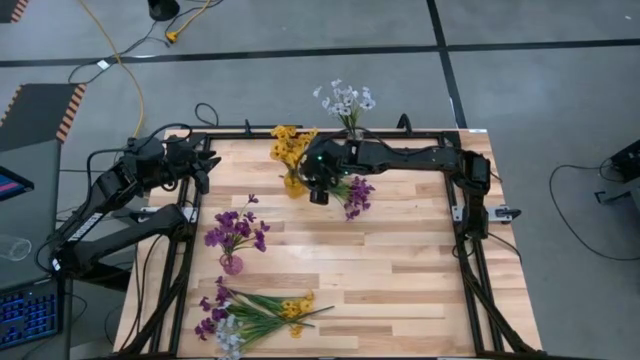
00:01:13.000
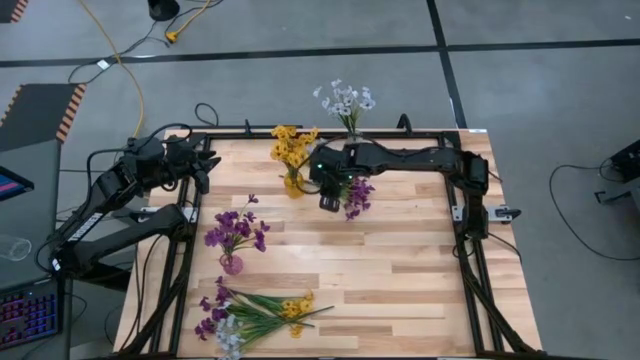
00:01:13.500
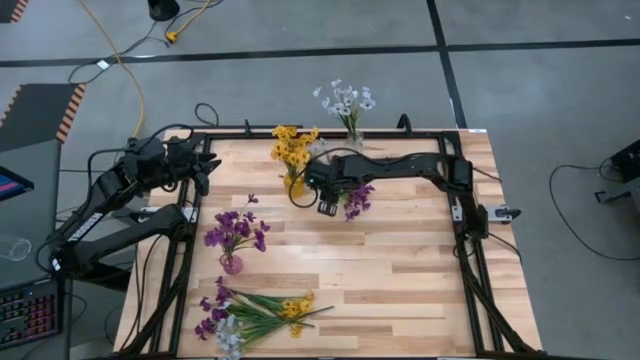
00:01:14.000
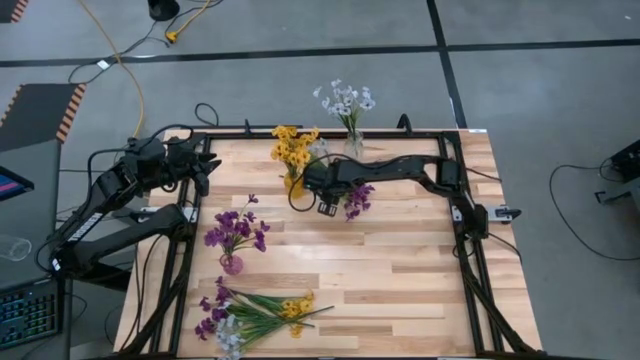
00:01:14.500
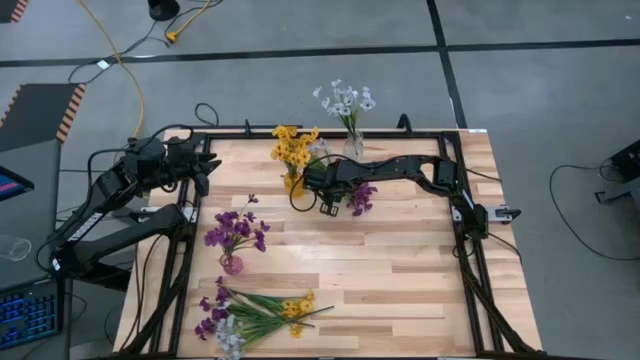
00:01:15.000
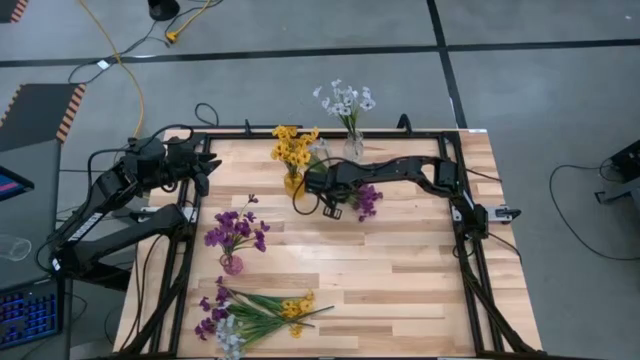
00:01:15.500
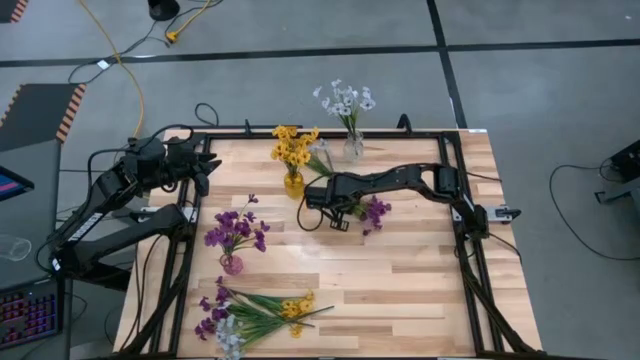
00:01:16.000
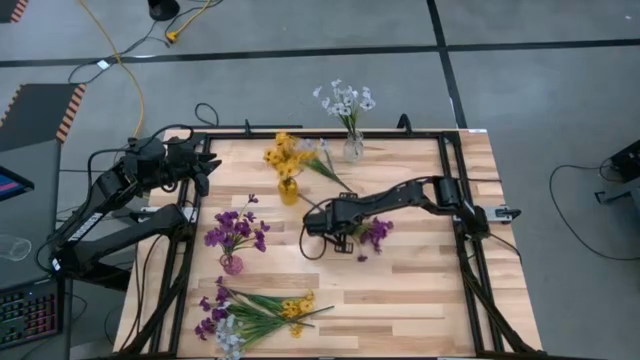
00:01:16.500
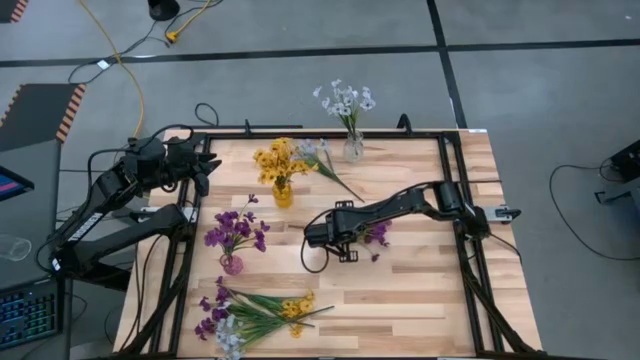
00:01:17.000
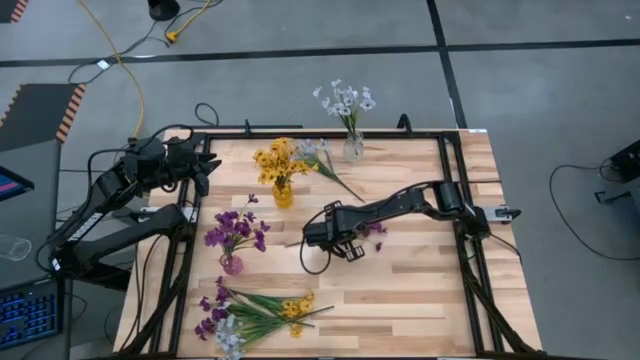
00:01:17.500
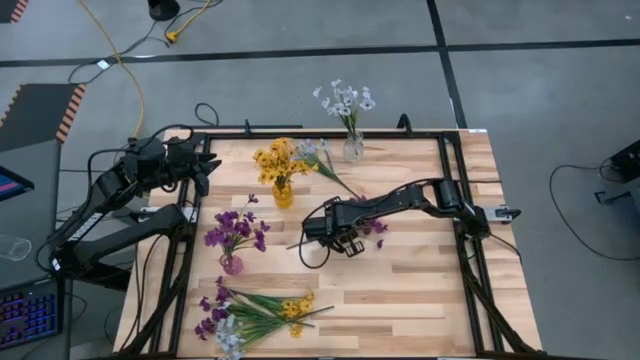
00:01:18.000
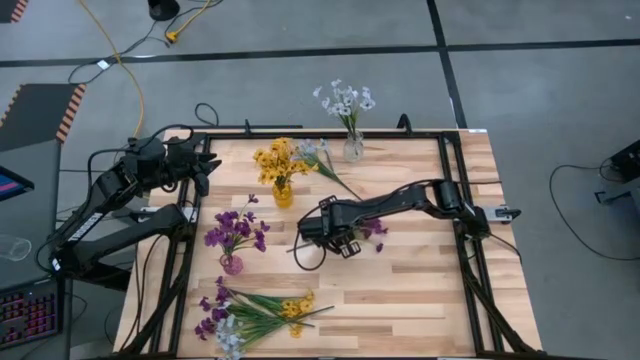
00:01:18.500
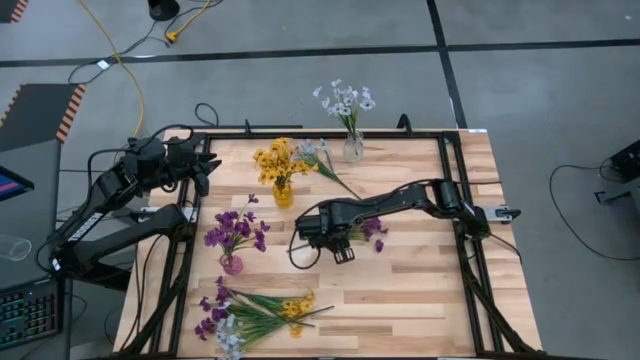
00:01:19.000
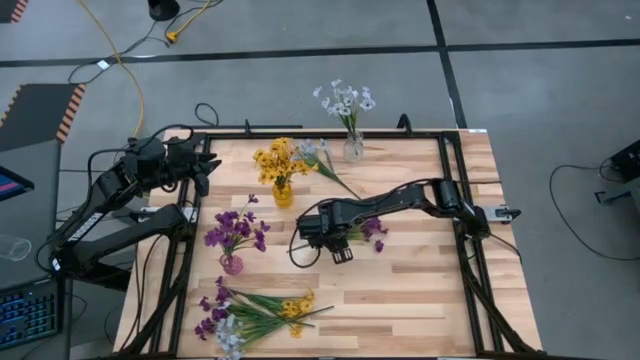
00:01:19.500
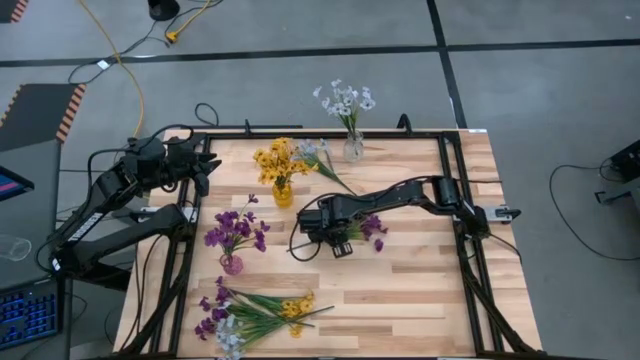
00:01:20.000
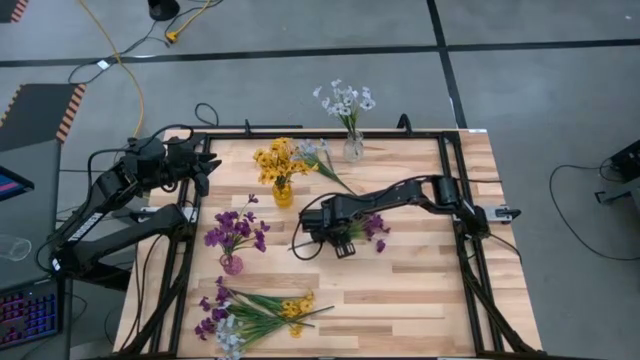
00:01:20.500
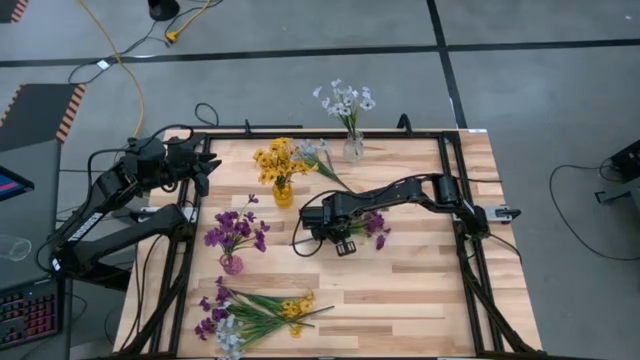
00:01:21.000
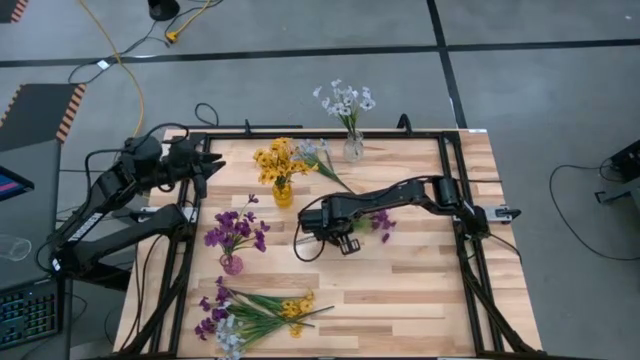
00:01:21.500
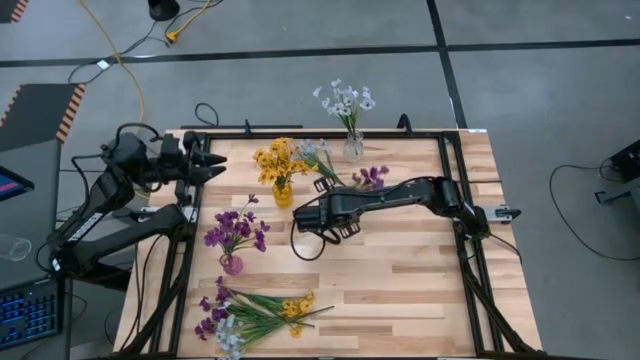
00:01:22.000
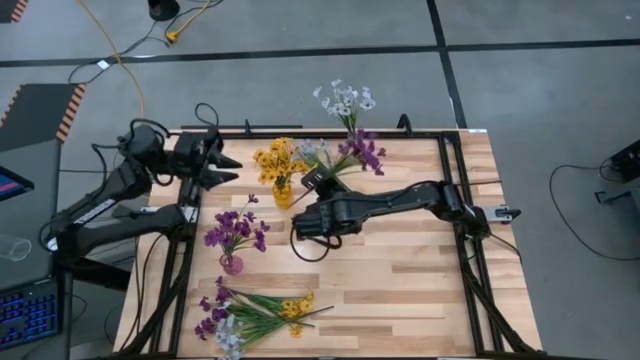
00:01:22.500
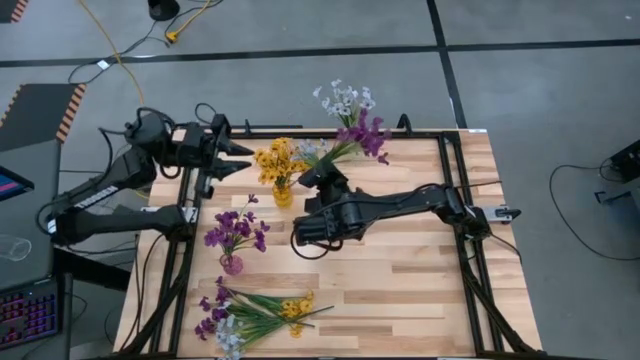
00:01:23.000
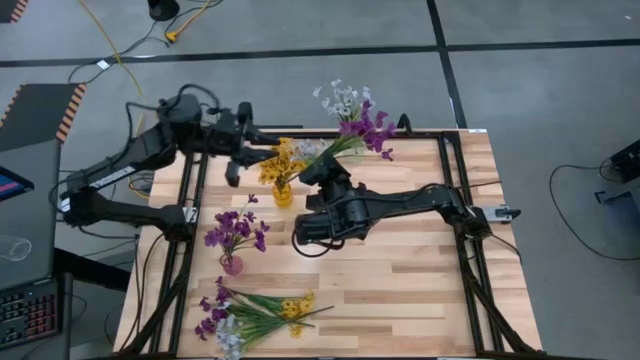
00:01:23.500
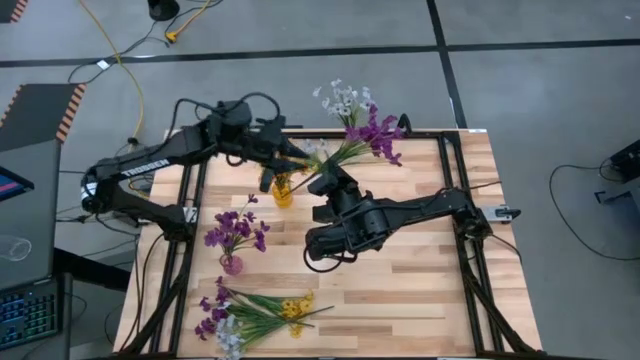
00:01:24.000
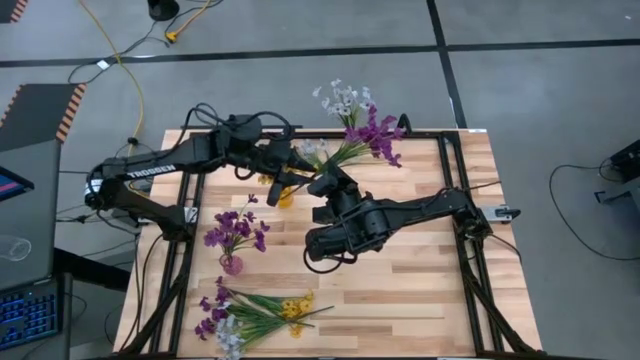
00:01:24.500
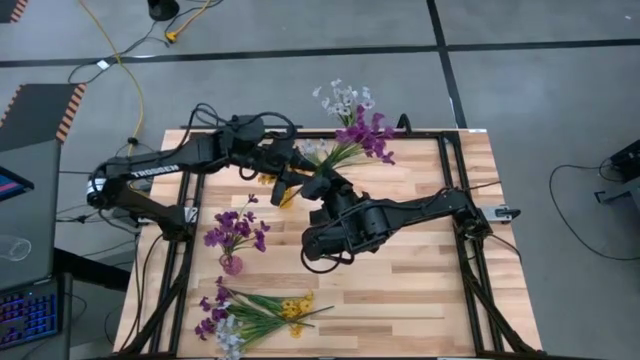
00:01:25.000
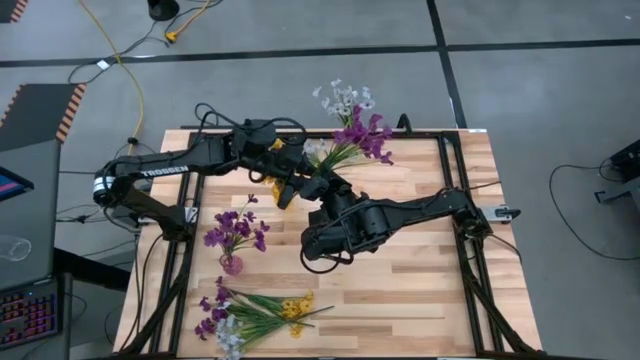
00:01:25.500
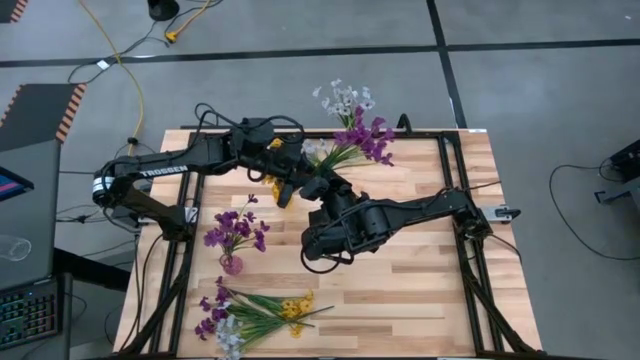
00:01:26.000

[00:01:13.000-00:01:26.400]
Task: Sort flowers into vase by color
Put the top violet flowers into the violet vase

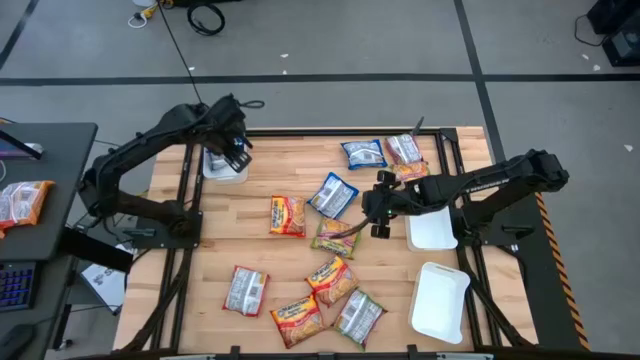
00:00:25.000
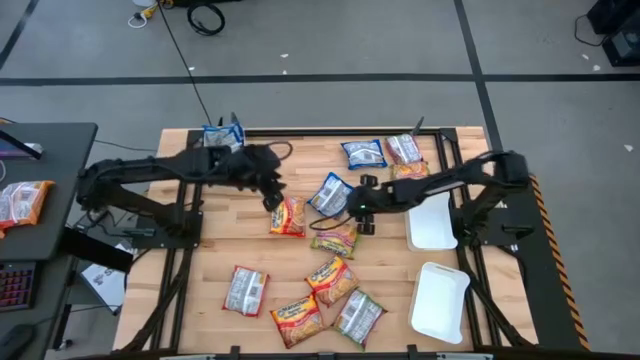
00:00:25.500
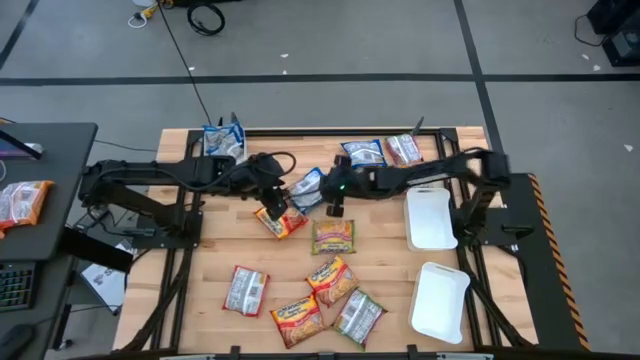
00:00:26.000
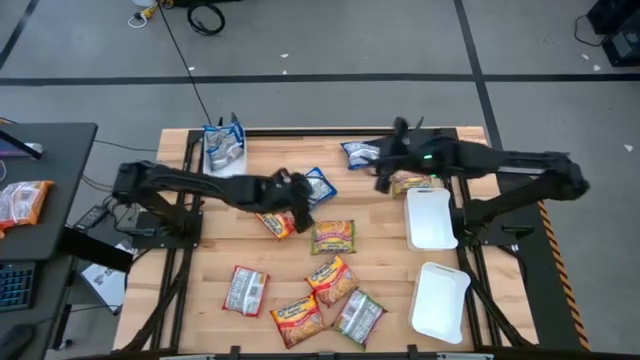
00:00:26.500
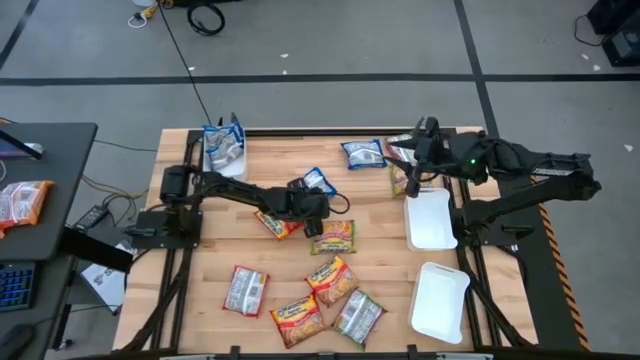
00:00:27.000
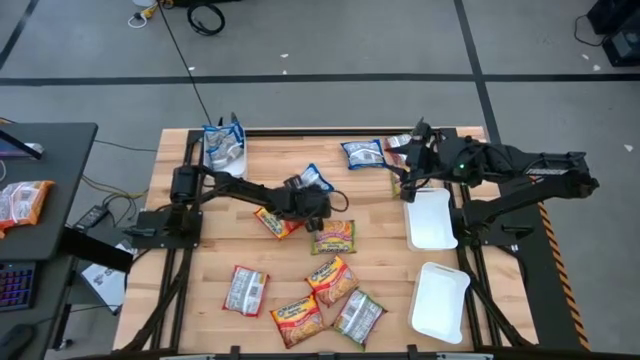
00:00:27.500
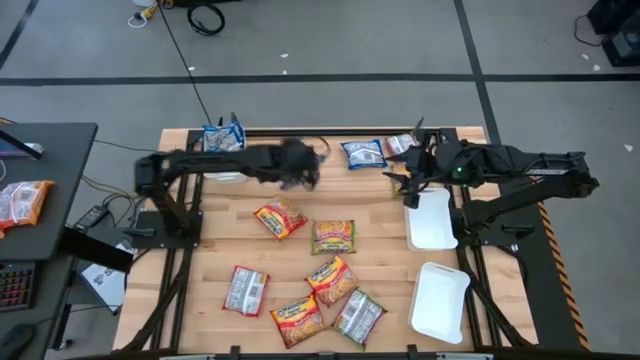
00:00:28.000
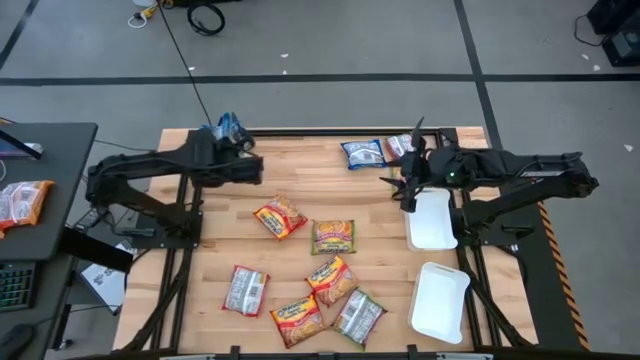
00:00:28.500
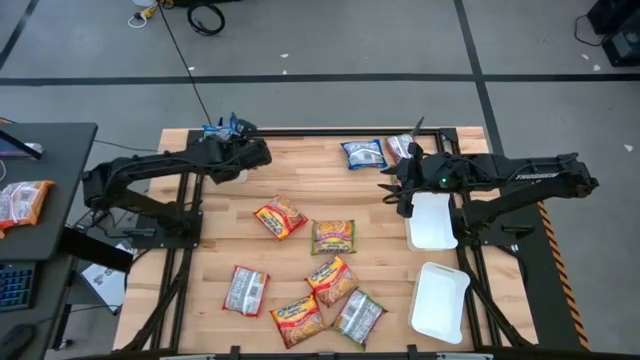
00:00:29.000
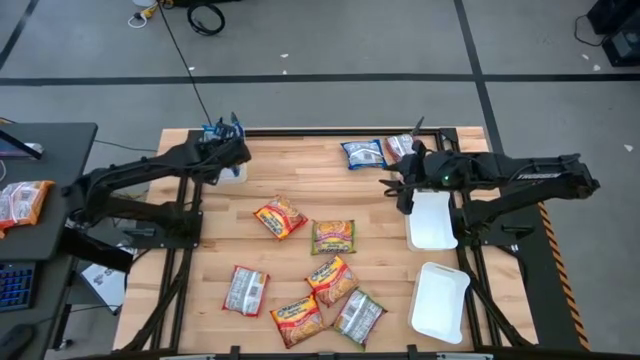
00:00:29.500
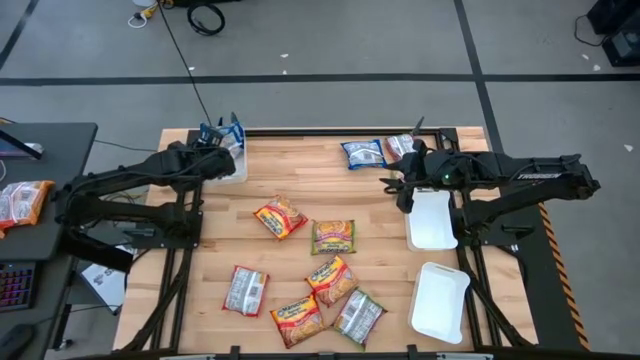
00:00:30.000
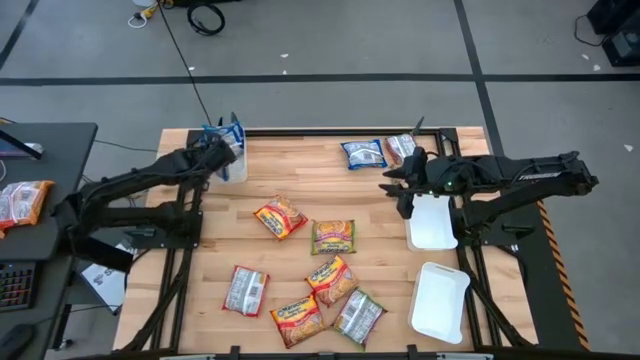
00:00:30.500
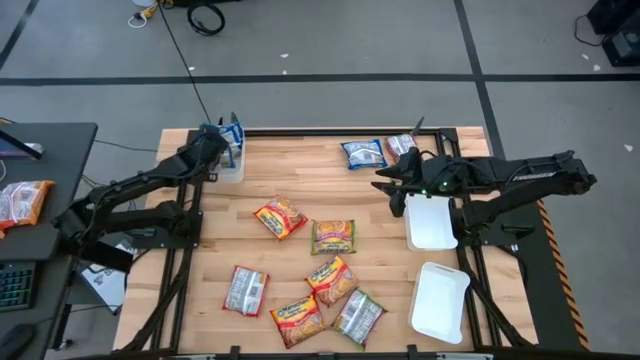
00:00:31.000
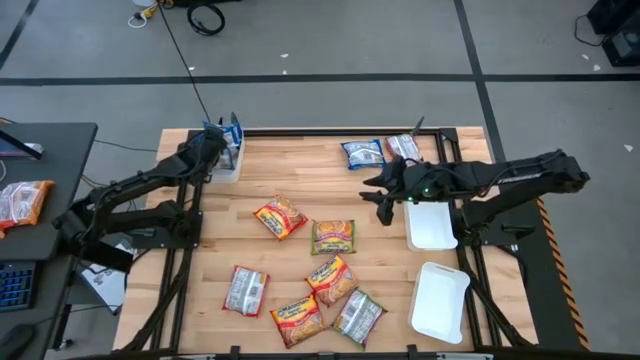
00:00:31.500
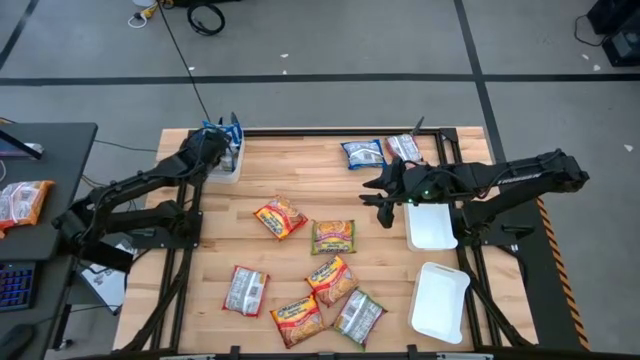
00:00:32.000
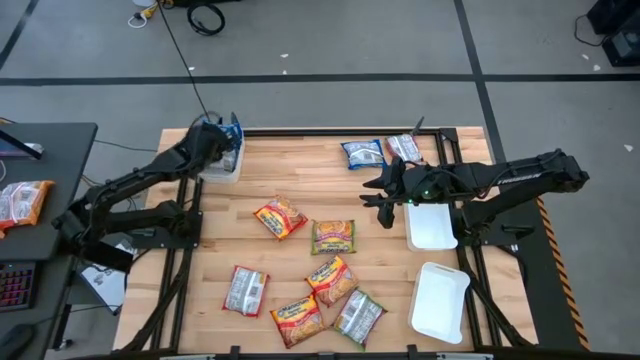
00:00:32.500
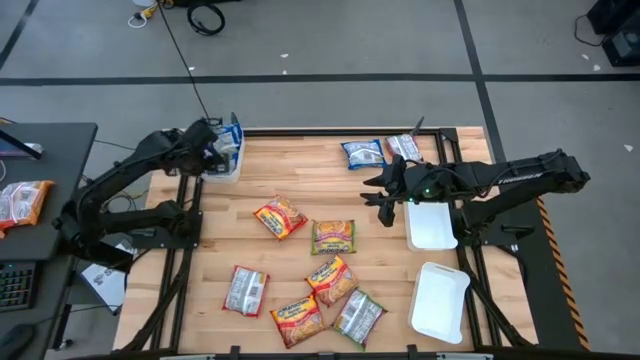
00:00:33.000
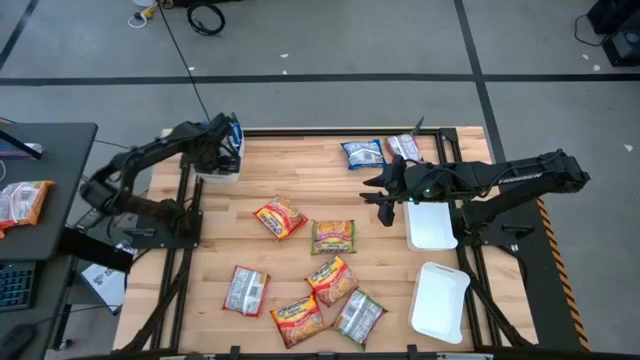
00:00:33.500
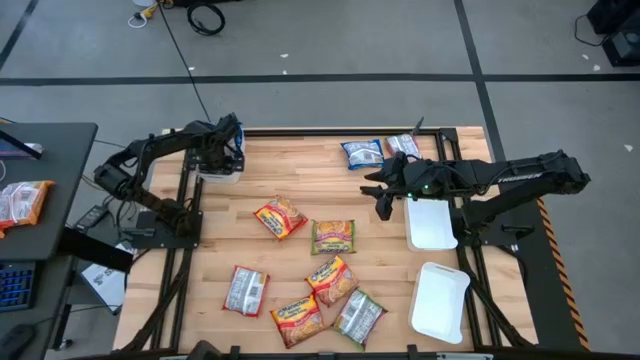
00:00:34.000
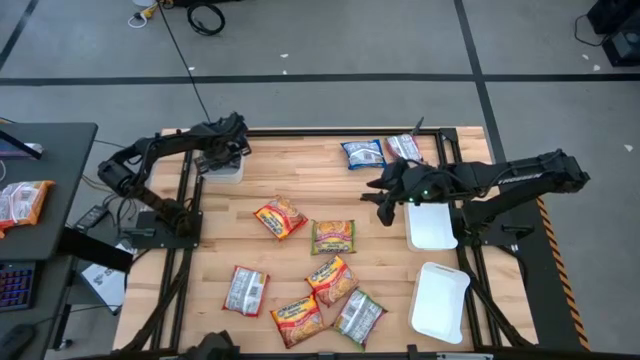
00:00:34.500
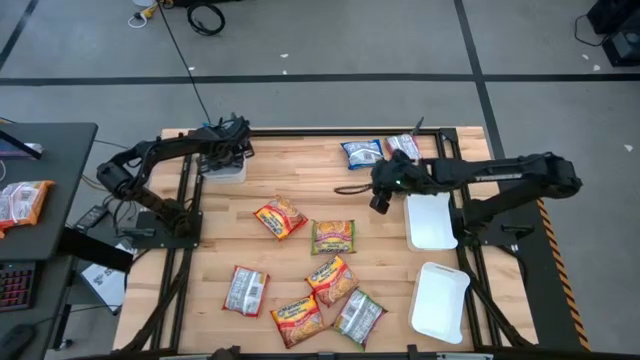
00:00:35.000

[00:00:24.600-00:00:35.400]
Task: Sort Maruchan noodles
Put the blue noodle pack into the top left white bin
